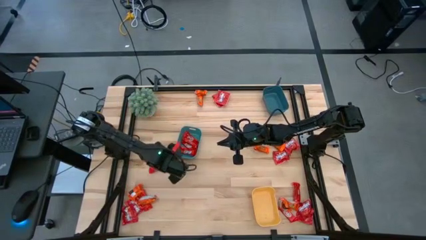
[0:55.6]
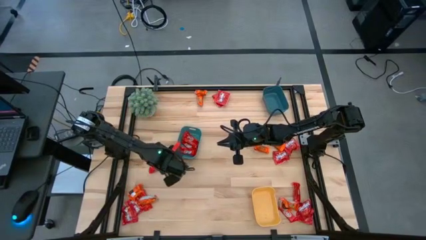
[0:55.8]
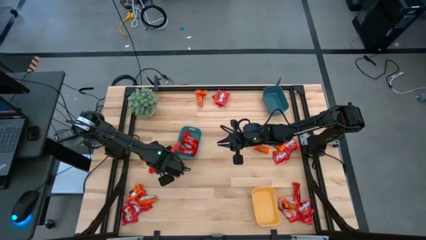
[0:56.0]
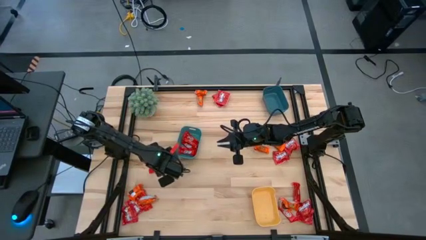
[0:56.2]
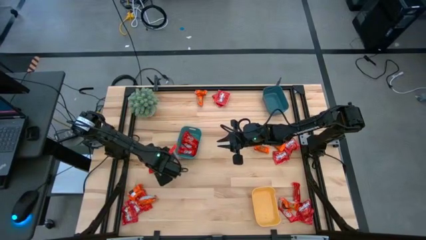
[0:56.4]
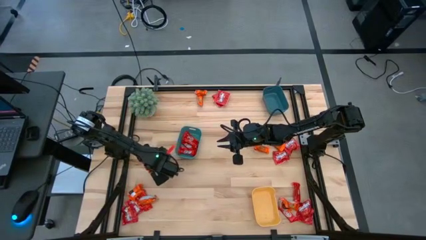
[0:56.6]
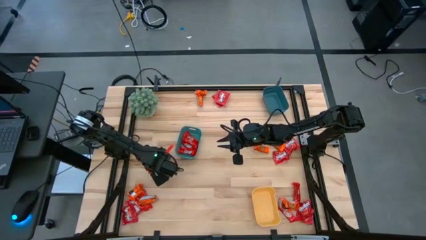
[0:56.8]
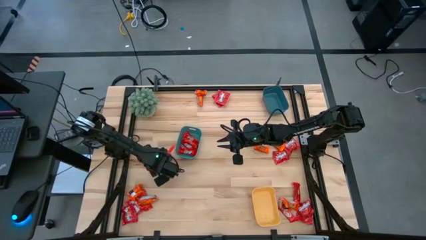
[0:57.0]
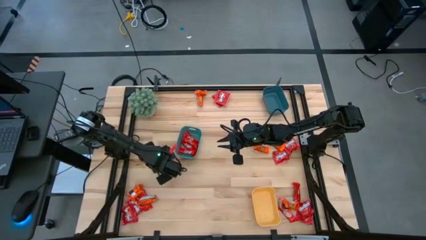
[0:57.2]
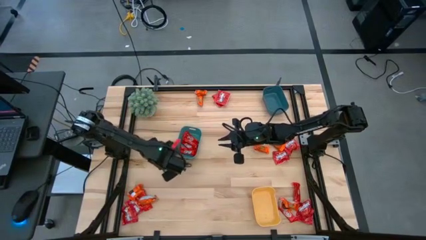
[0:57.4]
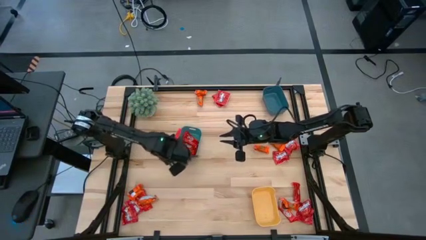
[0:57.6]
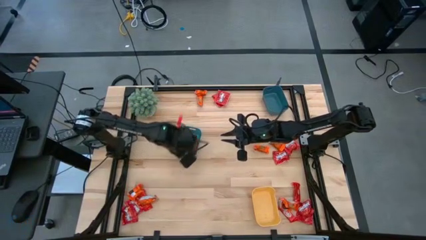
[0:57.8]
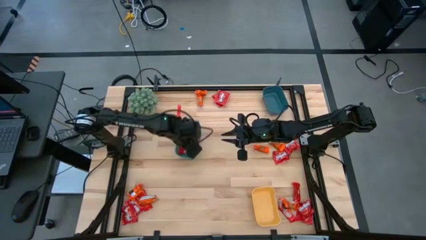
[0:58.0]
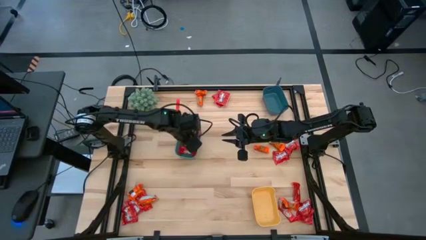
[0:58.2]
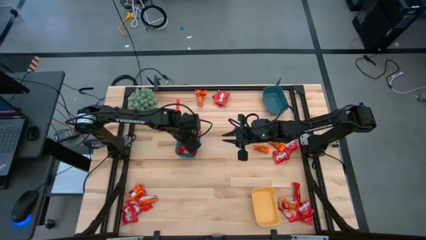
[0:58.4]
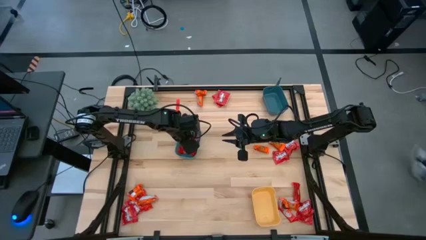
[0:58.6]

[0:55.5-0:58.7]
Task: Sort candy
Put the small red candy into the green bin

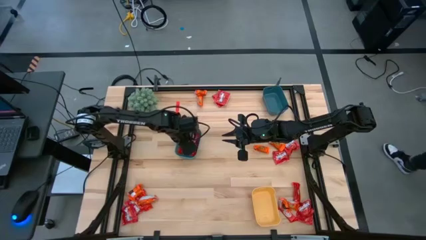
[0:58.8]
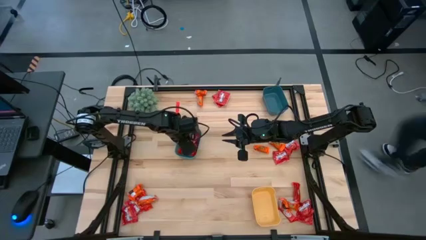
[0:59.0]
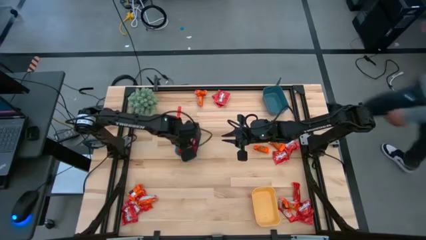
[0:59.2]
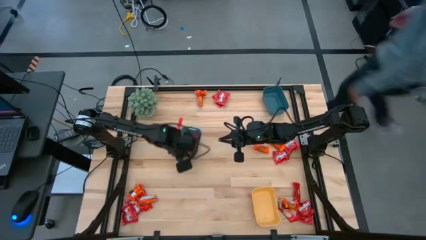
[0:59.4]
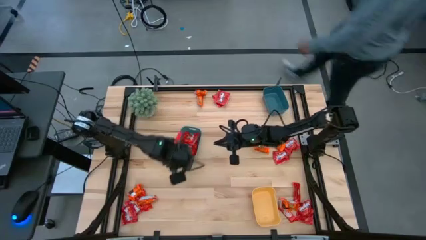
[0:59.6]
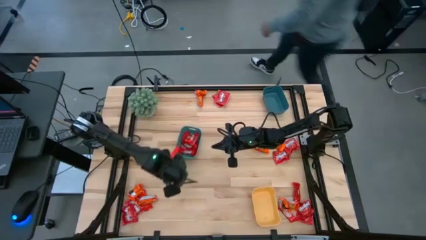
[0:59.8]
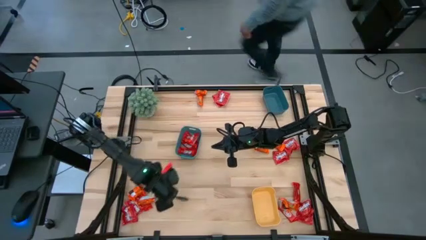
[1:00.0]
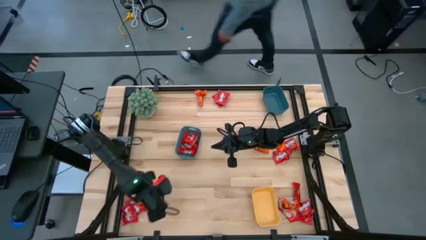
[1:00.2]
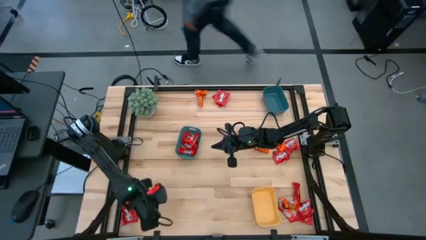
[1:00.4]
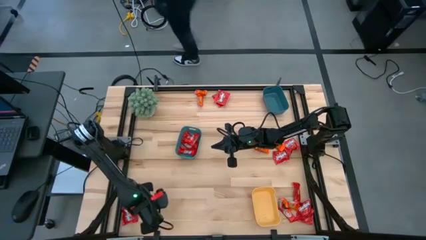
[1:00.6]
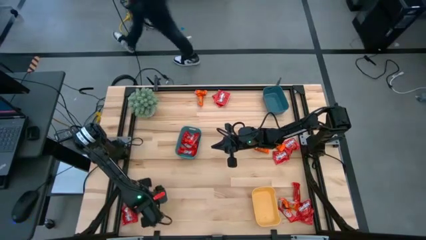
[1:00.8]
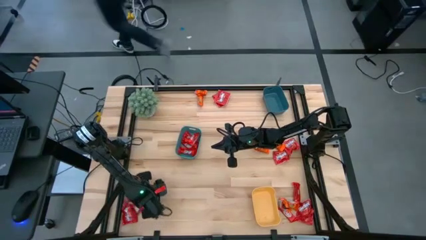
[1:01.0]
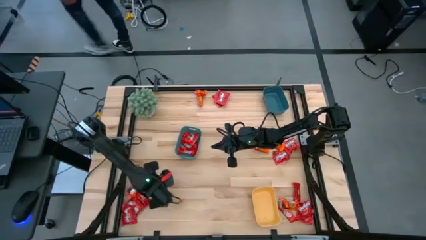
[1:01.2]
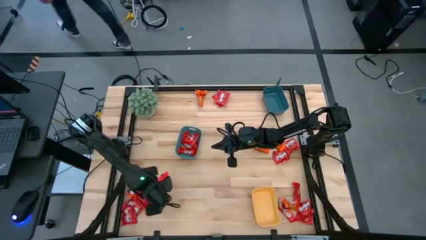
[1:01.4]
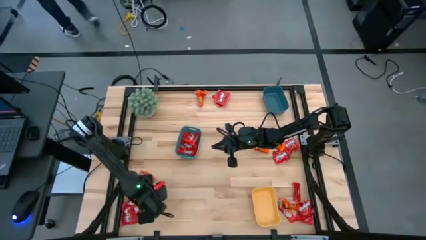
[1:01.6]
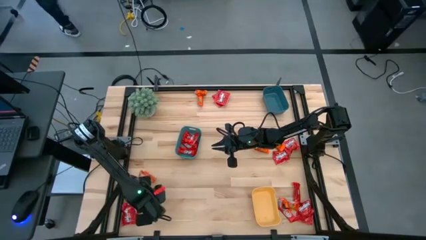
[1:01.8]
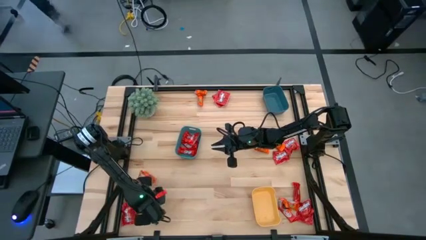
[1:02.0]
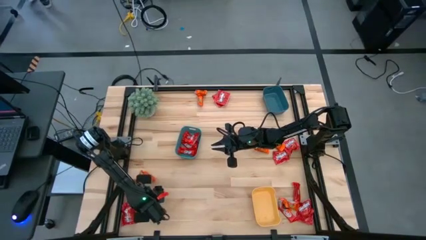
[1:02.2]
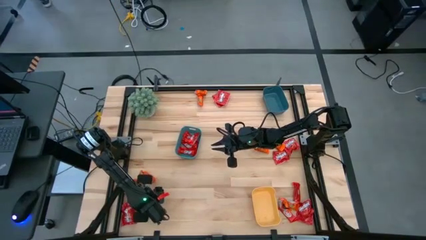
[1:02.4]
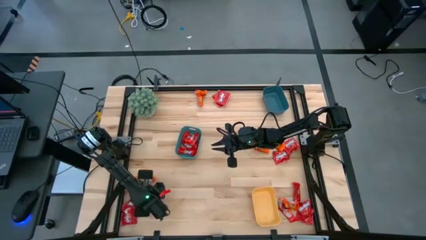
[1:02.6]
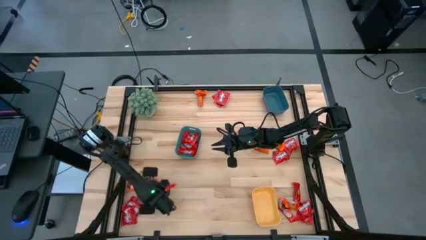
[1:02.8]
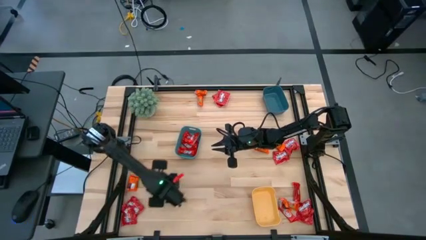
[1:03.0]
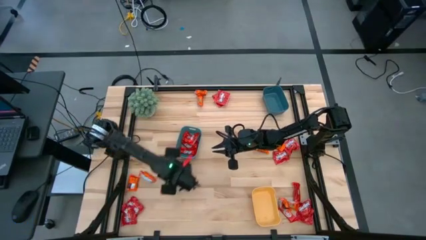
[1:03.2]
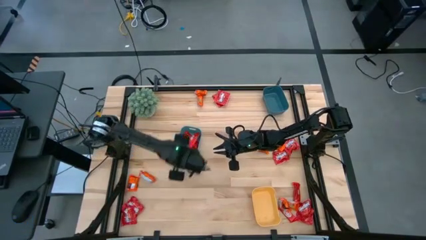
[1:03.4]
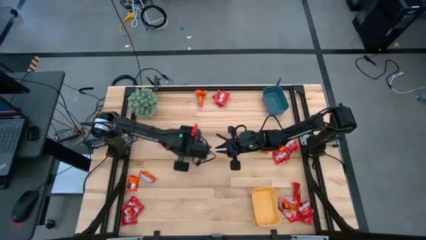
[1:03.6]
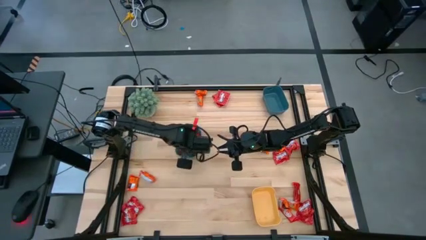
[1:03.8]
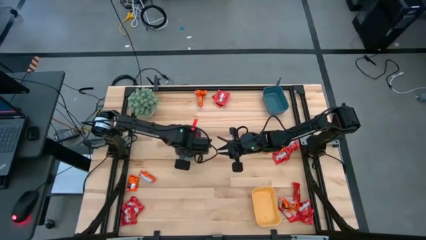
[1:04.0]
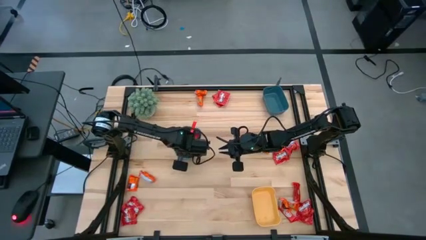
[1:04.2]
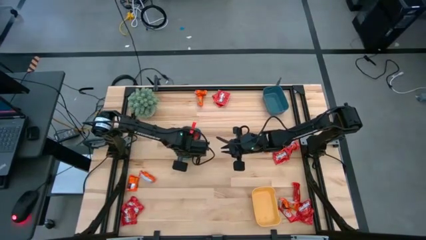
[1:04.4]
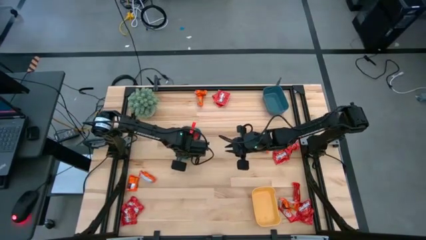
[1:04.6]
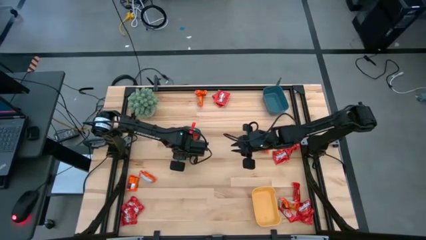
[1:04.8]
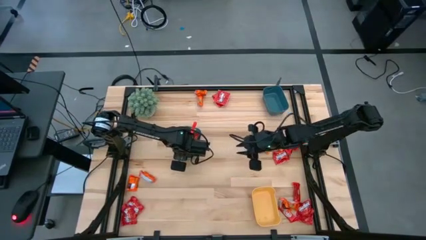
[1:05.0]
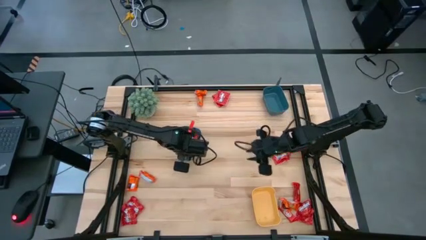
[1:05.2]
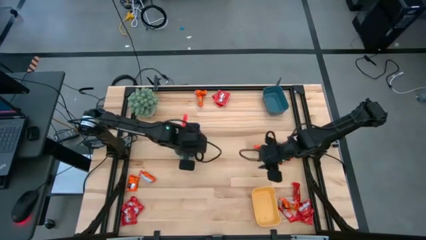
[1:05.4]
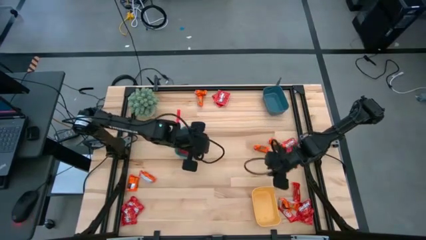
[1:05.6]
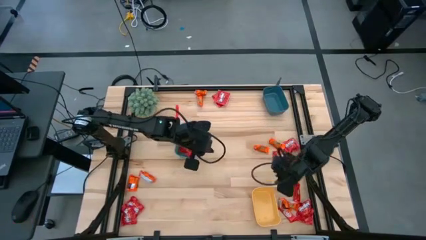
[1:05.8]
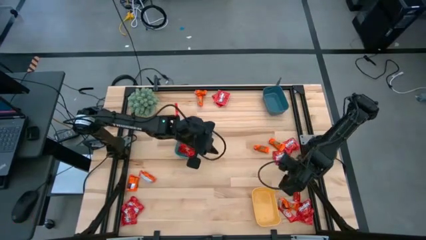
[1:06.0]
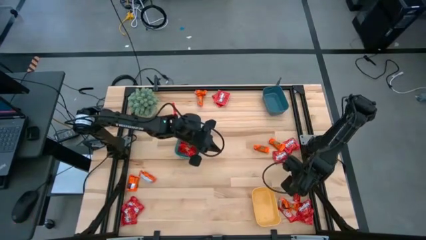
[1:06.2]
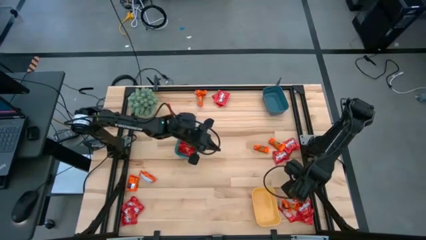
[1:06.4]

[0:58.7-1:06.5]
Put the small red candy into the green bin

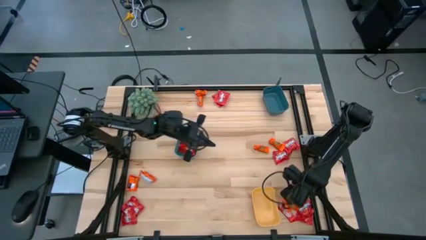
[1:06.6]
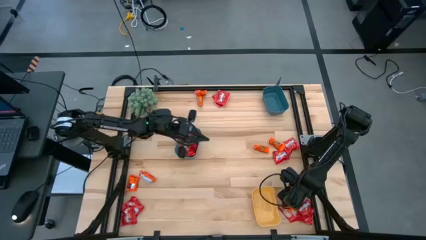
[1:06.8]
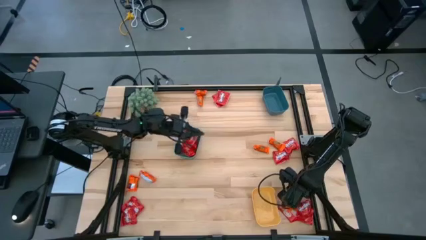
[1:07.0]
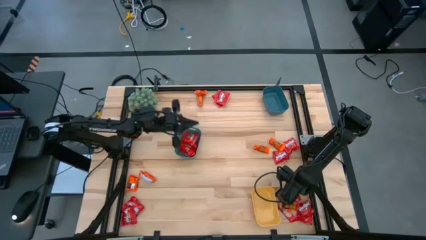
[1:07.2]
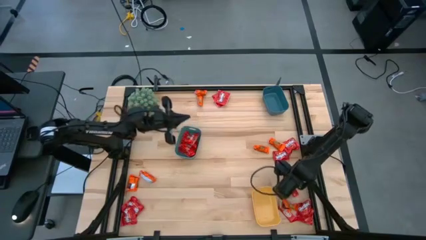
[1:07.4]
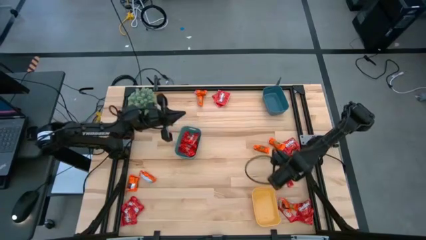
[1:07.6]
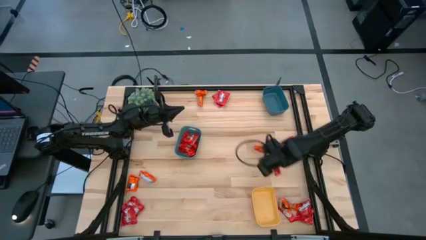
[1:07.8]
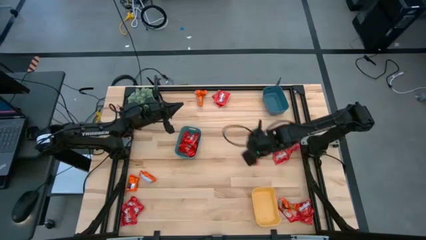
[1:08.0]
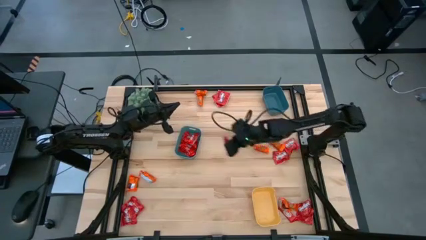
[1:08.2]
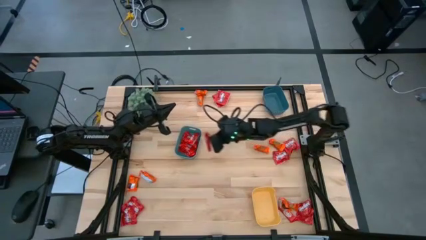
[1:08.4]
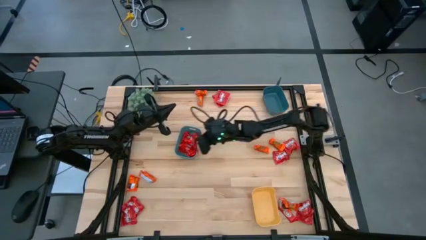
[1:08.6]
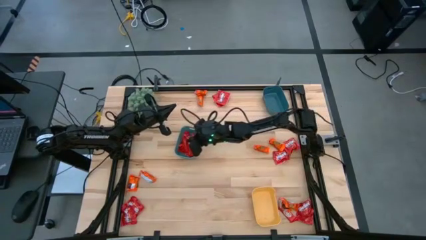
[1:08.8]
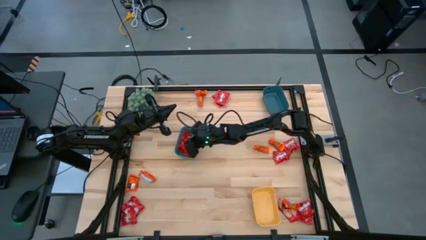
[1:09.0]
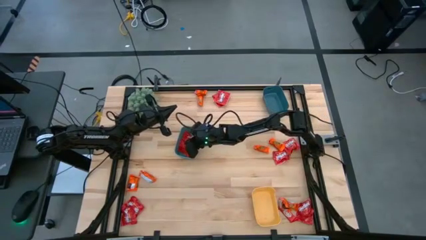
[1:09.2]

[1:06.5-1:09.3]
Put the small red candy into the green bin

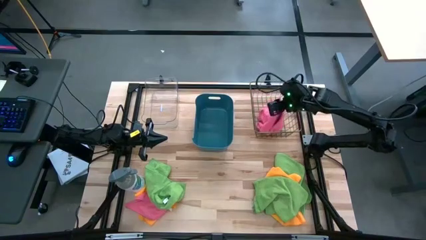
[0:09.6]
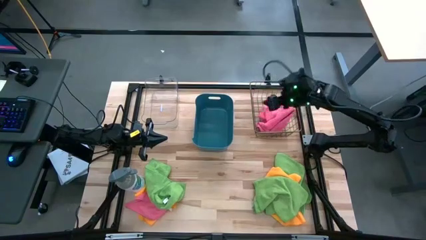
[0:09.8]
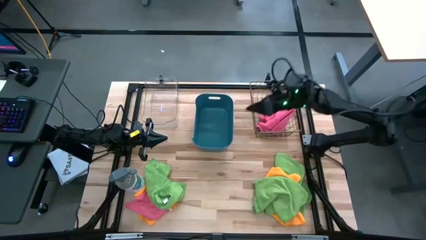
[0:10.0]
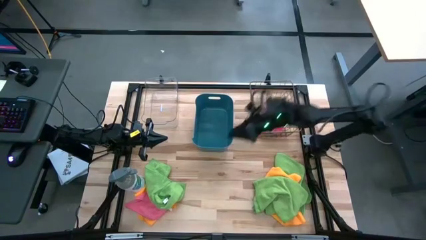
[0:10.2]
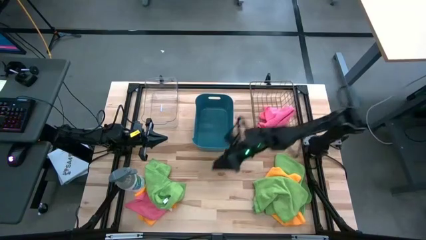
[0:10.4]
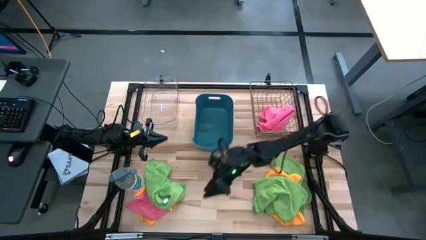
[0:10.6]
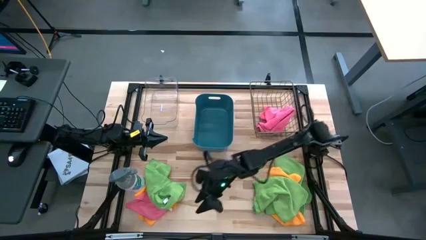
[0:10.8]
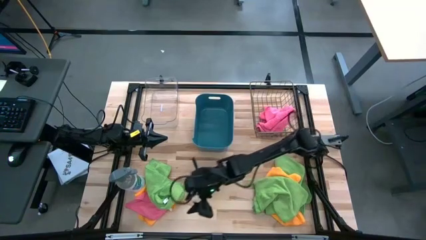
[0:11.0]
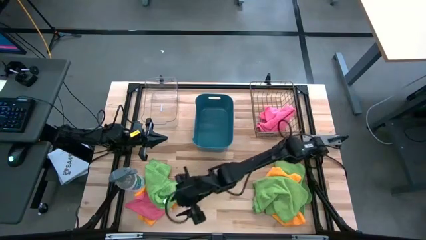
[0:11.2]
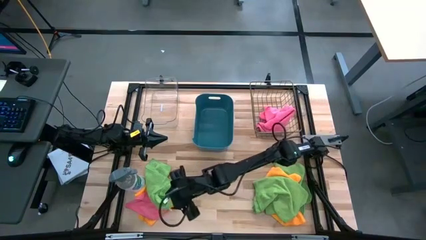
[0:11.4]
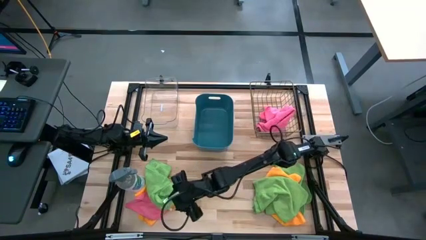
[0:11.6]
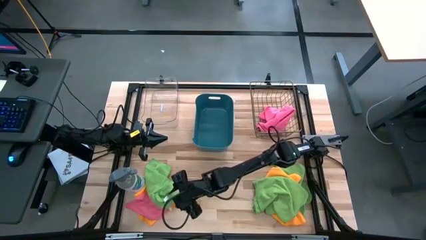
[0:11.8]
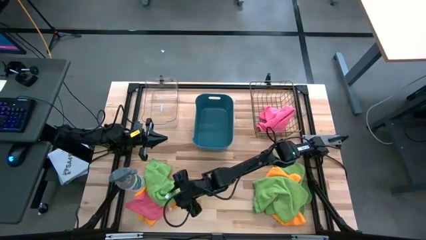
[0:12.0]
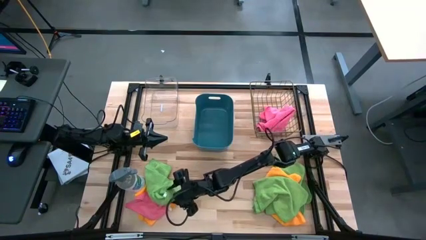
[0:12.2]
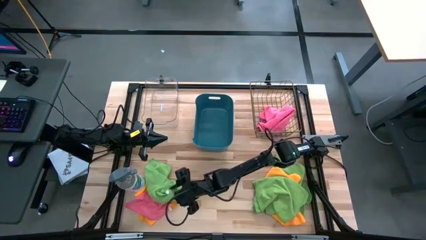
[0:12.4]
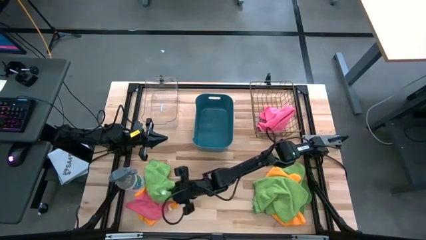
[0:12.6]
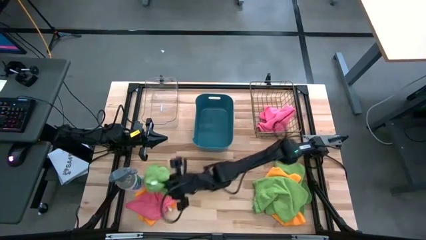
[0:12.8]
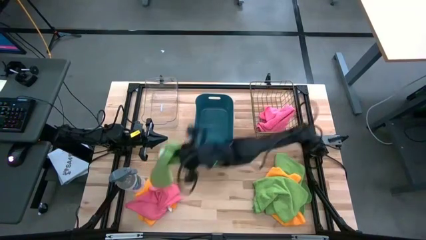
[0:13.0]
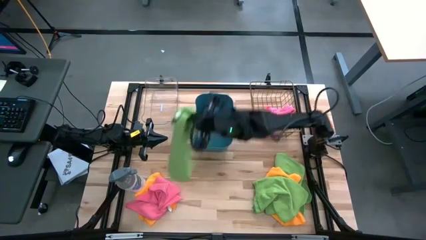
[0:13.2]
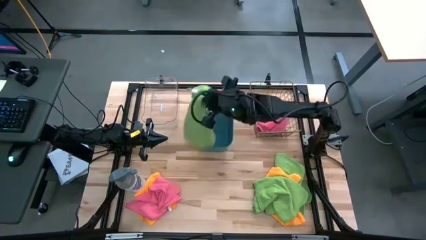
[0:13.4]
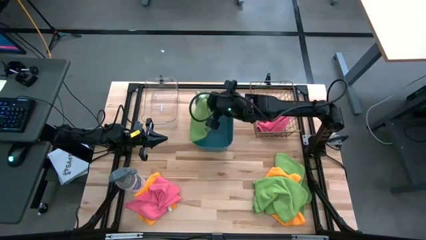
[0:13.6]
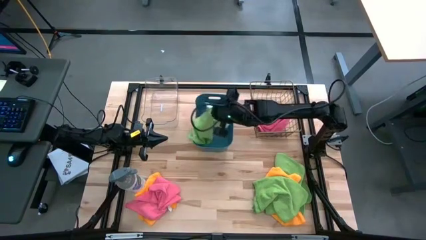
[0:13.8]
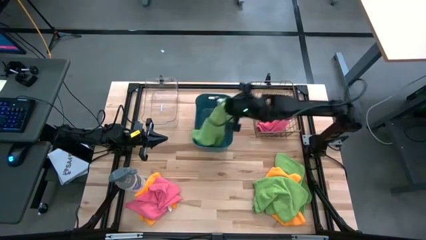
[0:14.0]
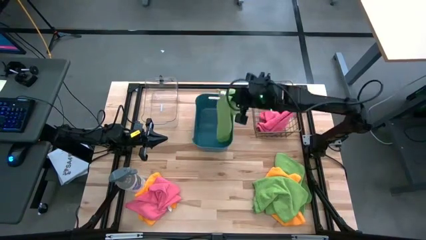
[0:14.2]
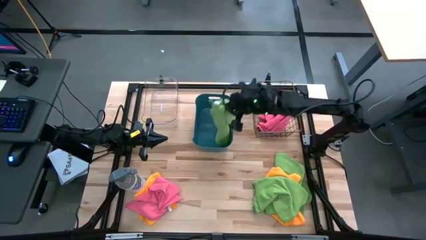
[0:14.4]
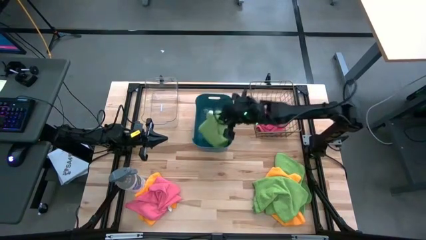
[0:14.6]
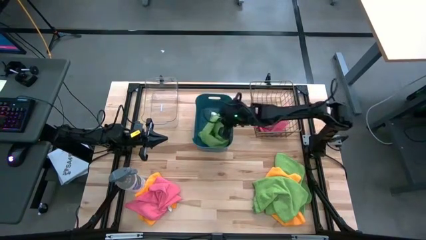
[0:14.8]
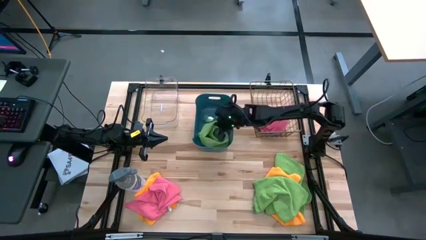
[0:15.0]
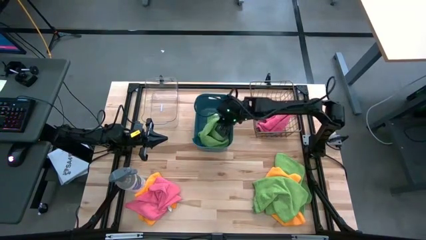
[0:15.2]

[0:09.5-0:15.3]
Task: Sort microfiber towel by color & place in baskets
Put the left green microfiber cloth into the blue bin
